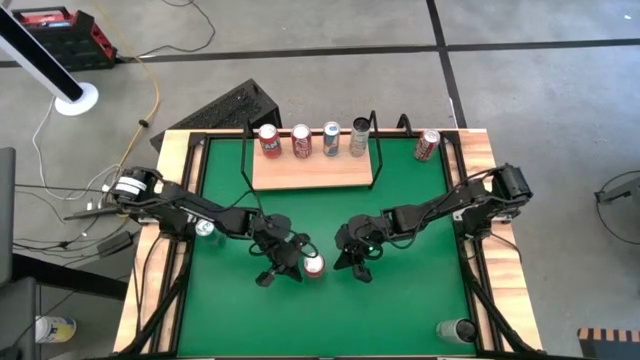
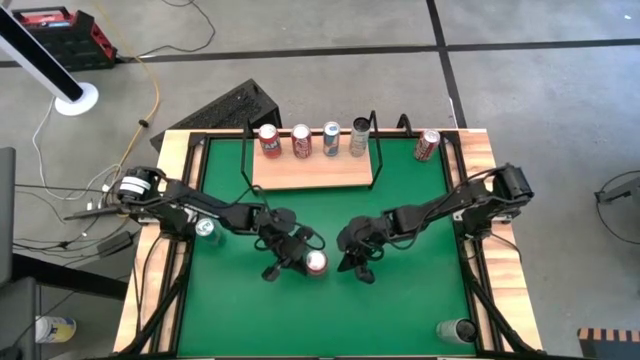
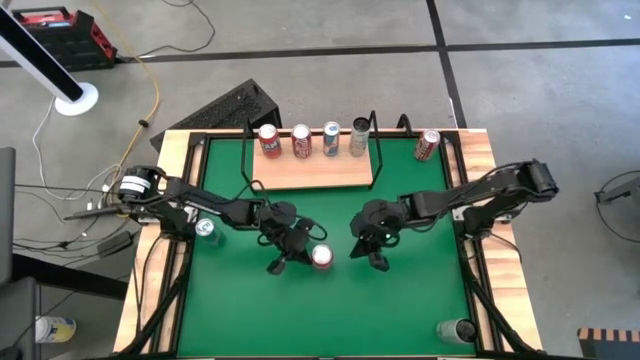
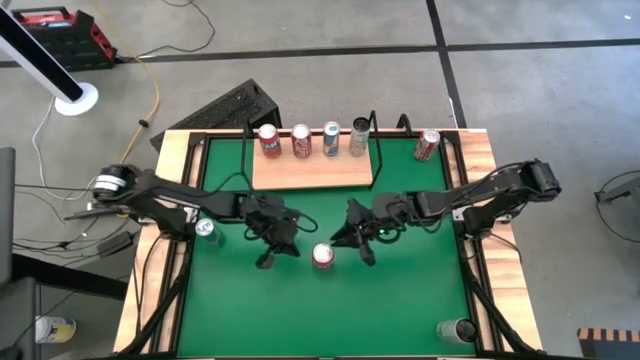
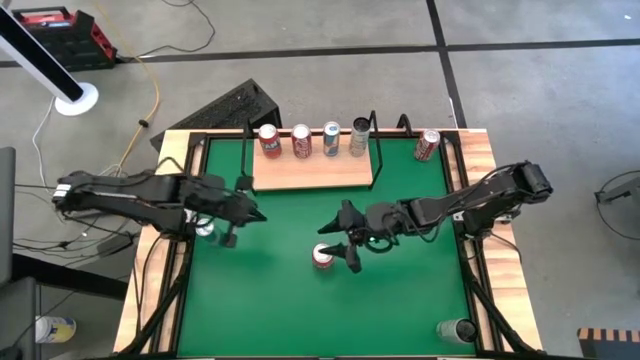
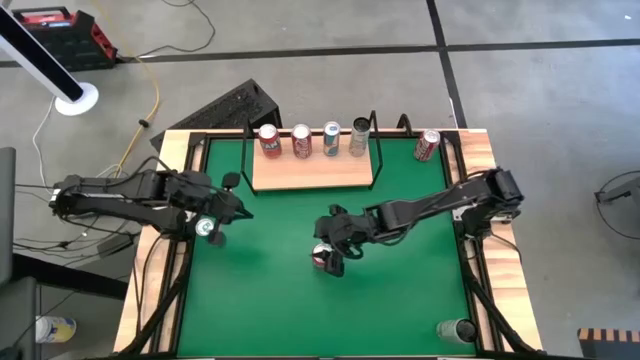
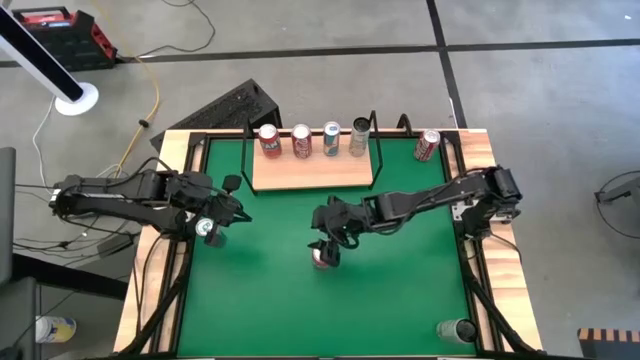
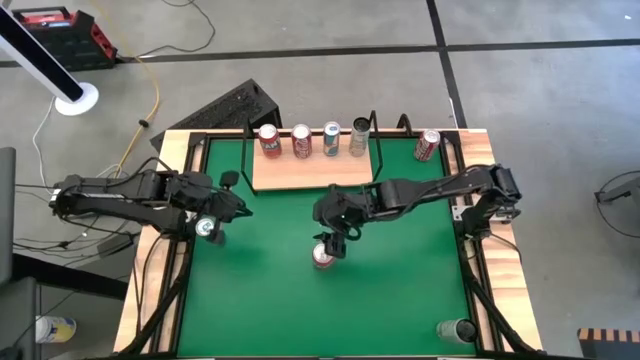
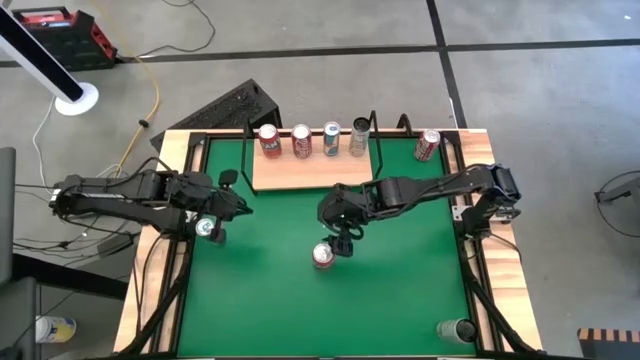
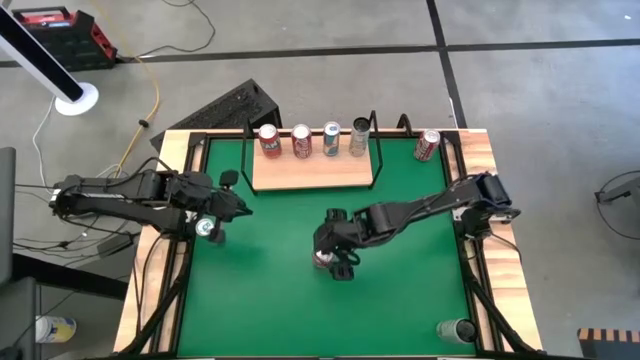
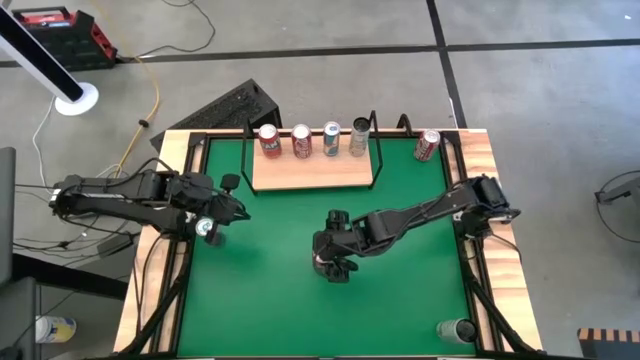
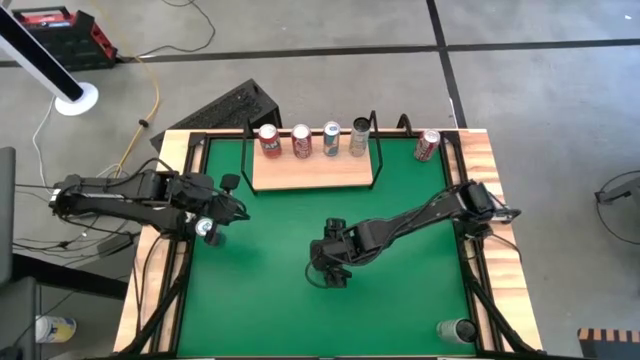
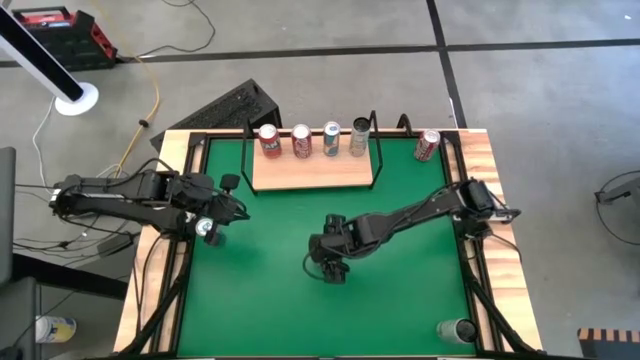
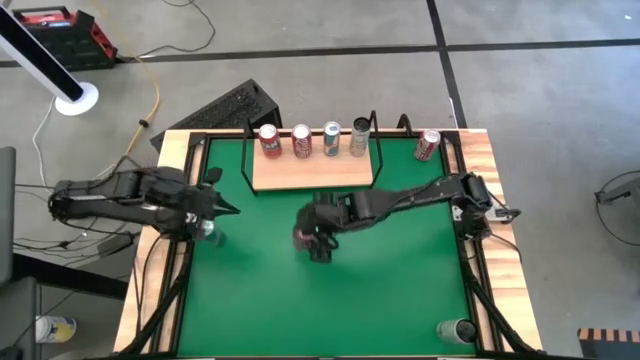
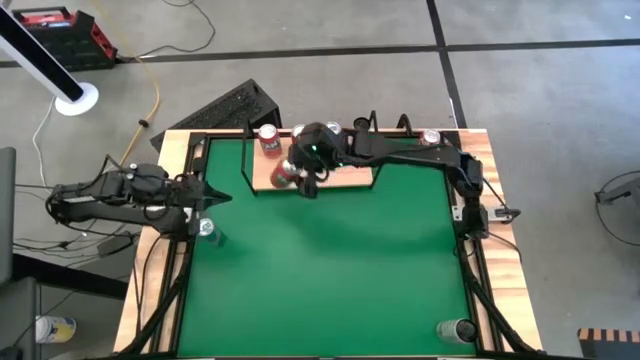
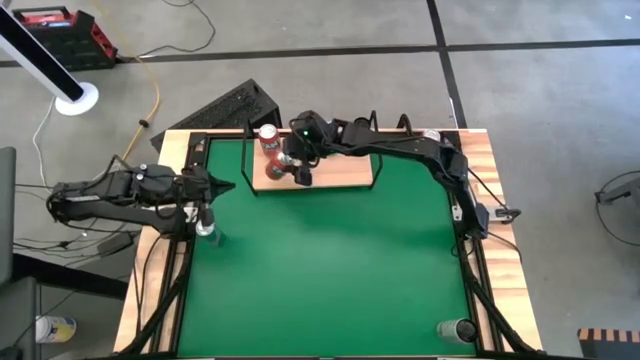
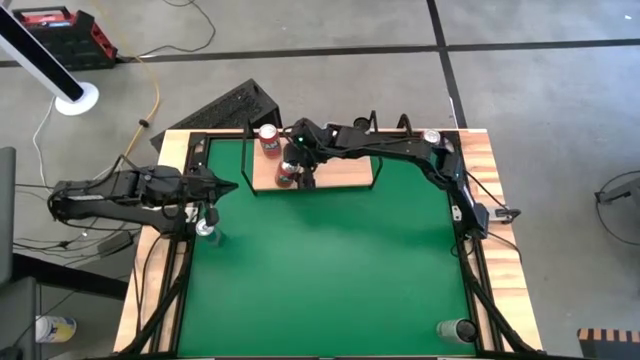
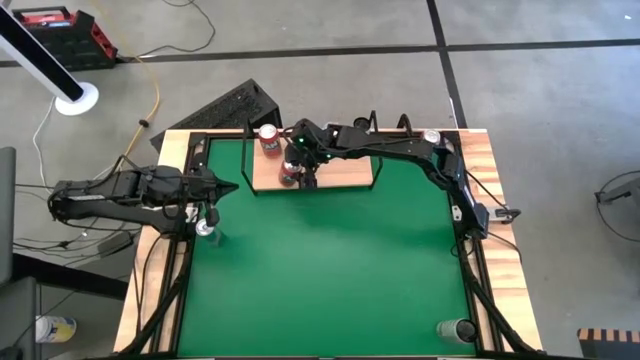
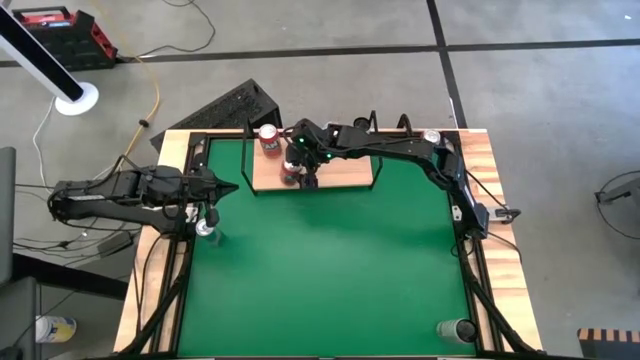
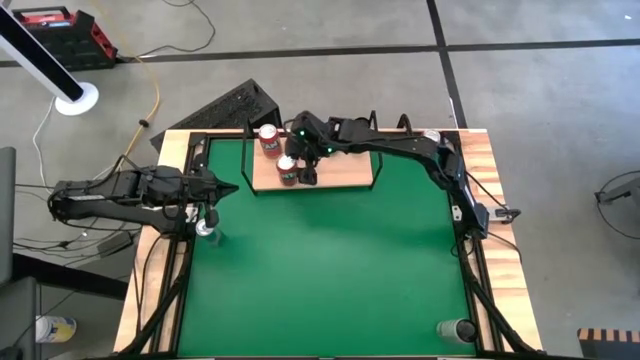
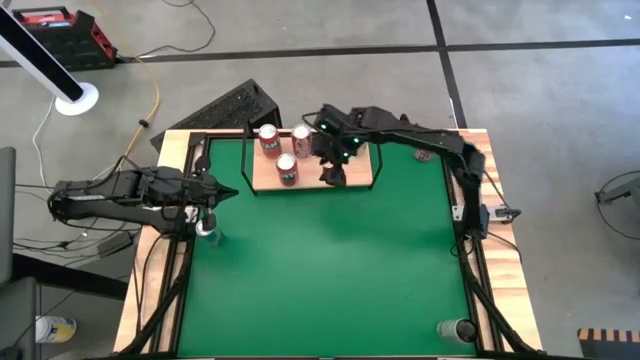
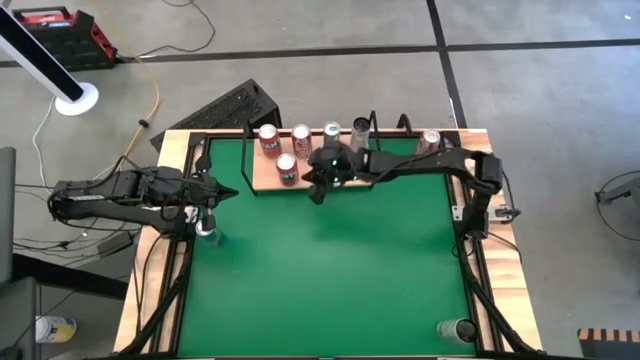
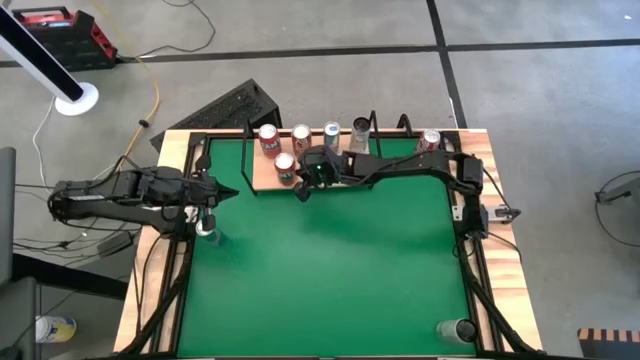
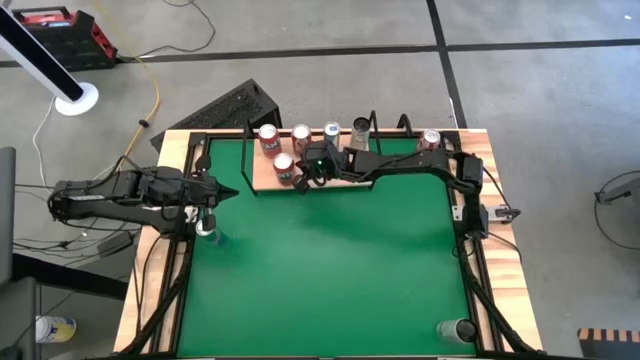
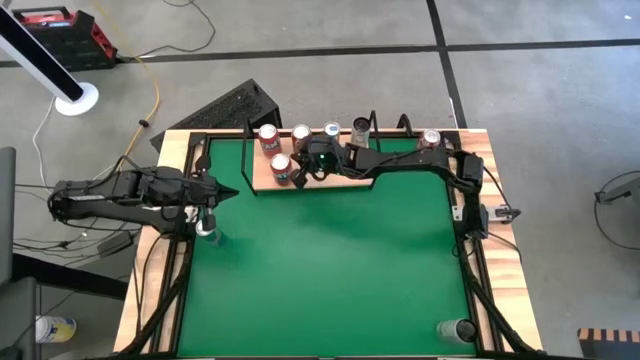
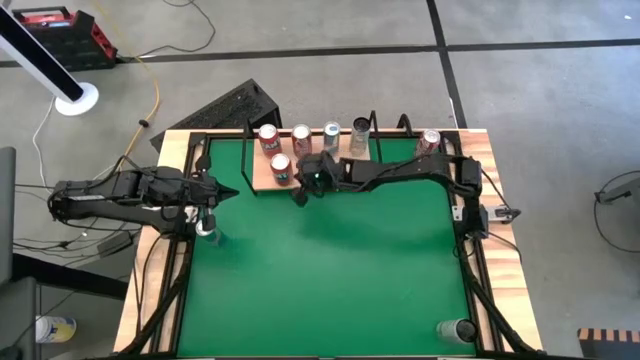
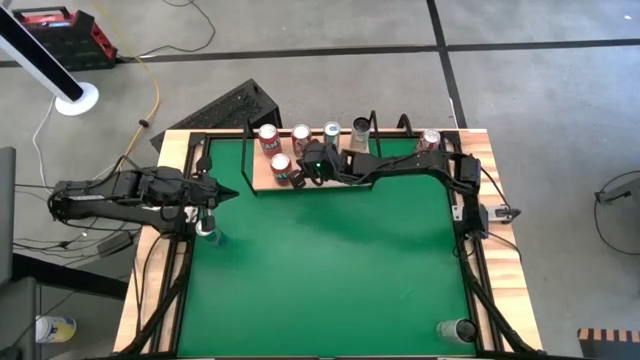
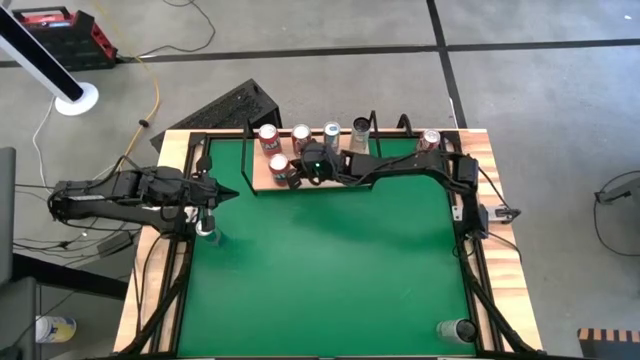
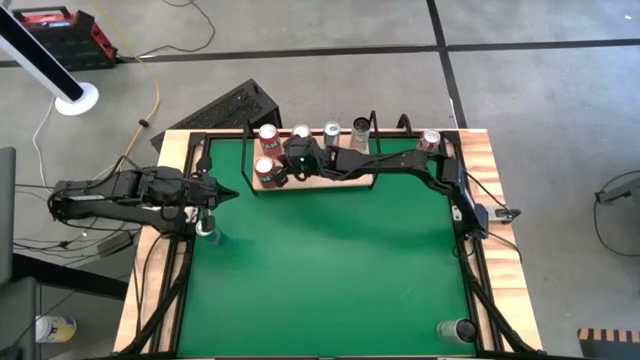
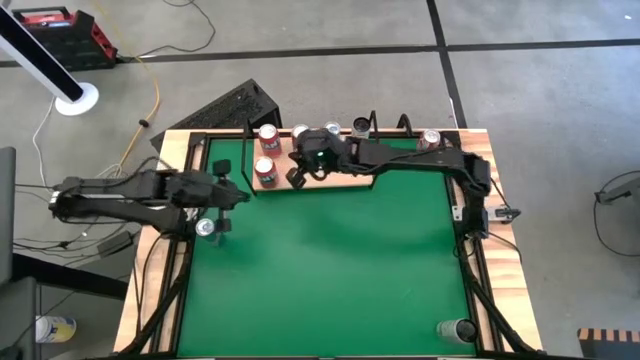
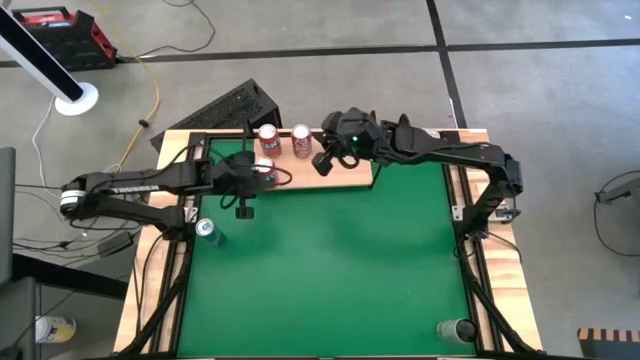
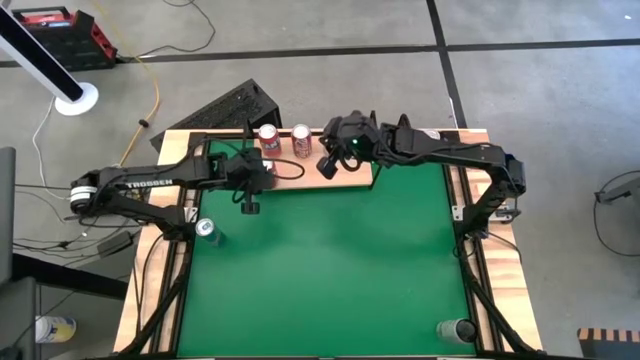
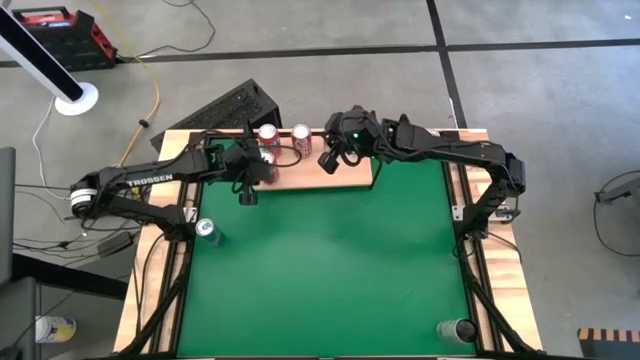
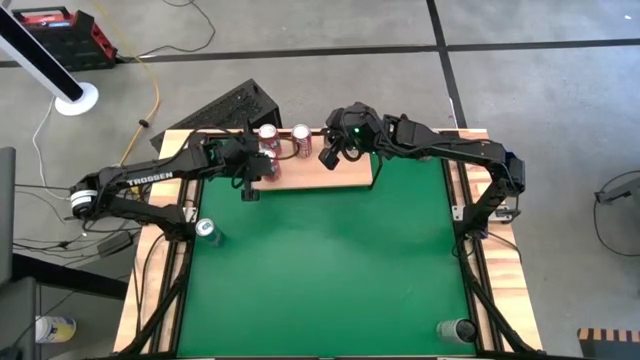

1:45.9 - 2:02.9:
Task: Place canned beverage on shelf
Put the orange soda can, aligned with the other orange soda can on the shelf

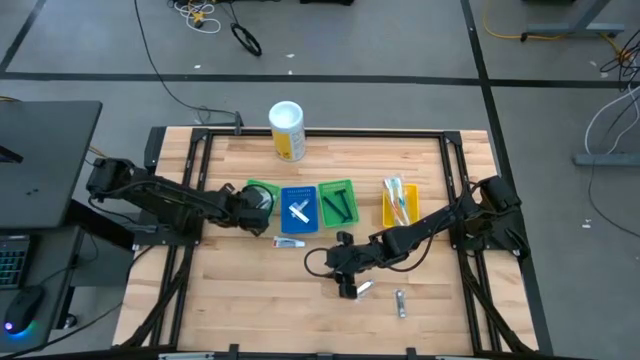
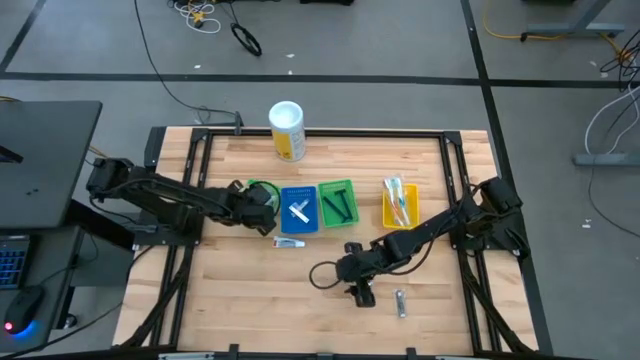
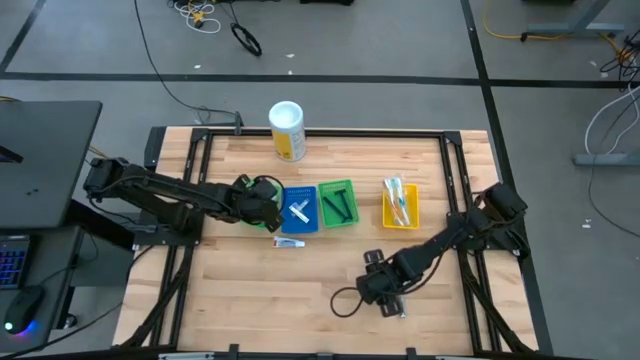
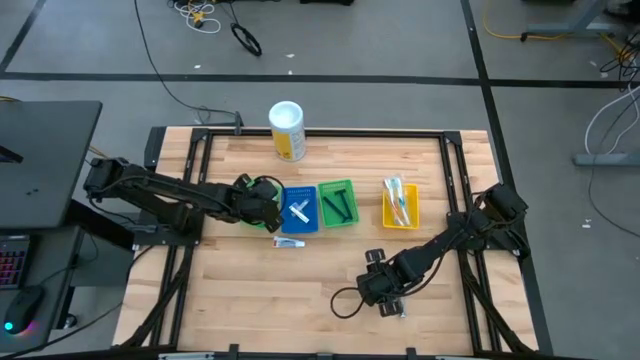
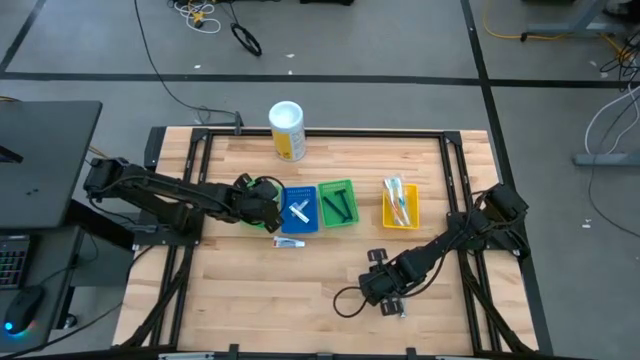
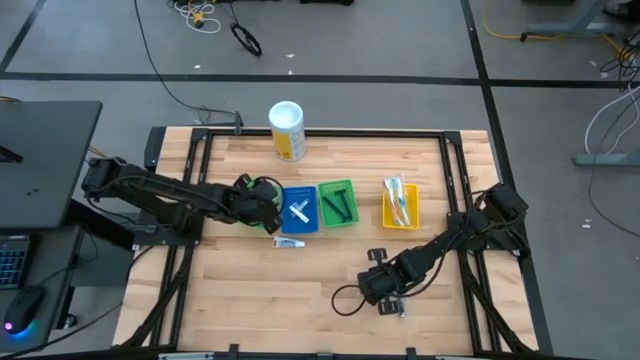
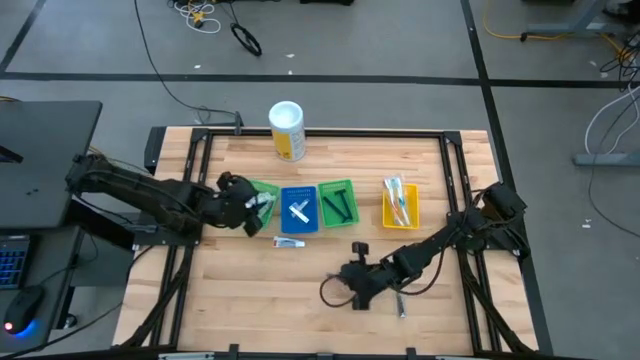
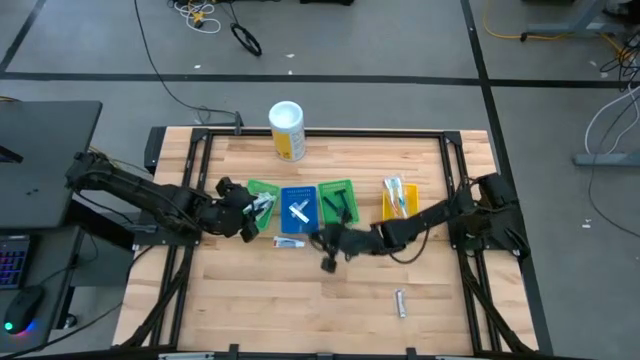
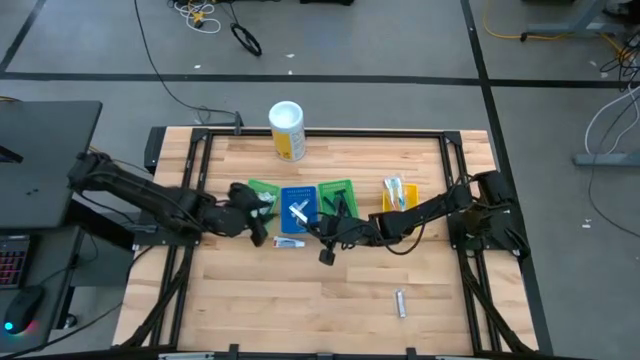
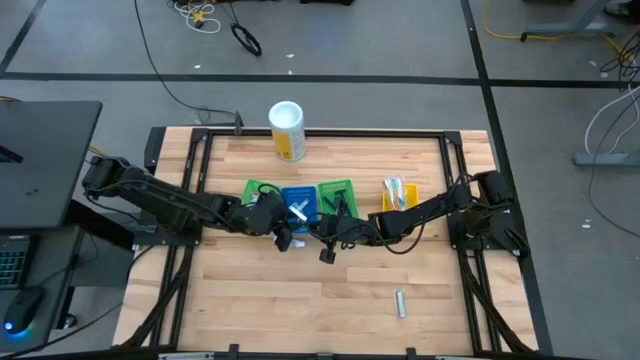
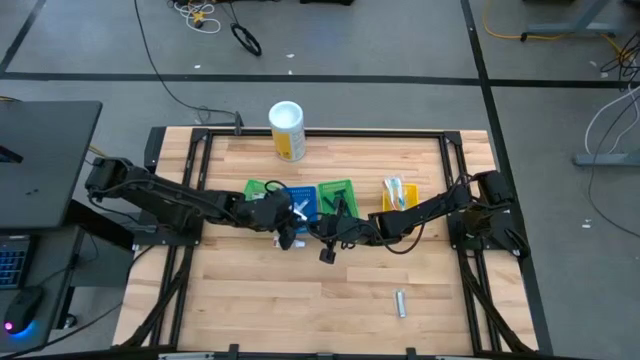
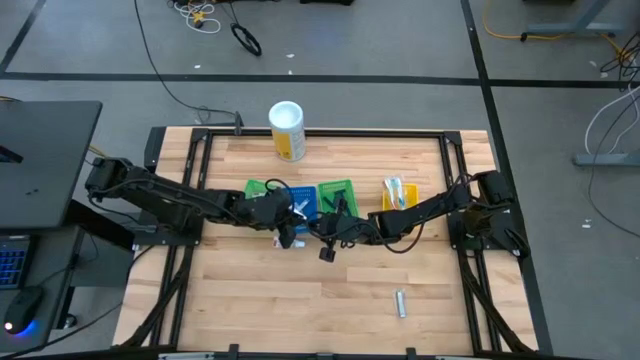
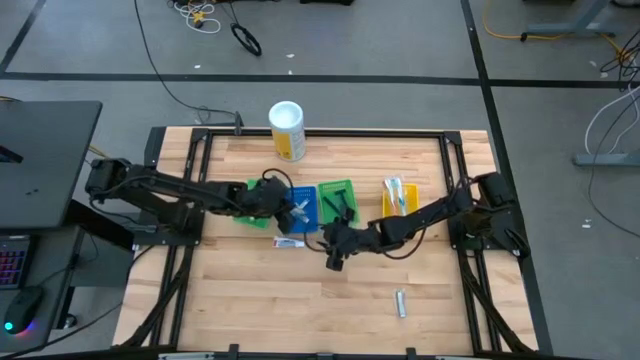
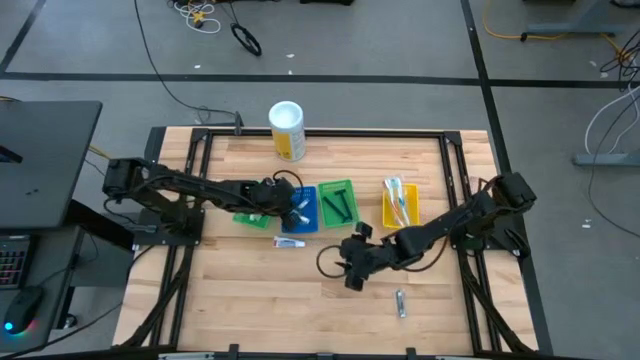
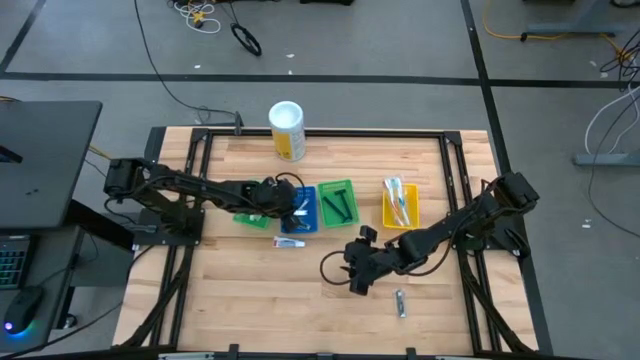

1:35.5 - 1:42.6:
Task: Pick & Place Travel size toiletries
Put the silver nail cutter into the blue bin
